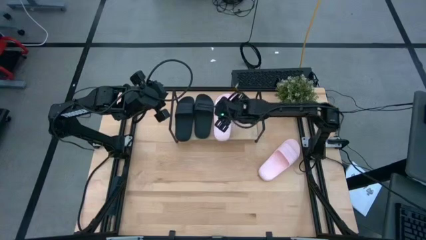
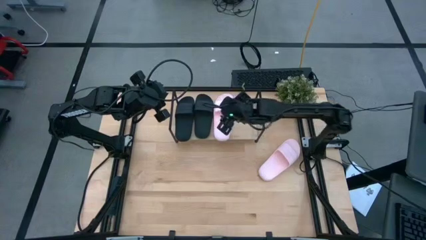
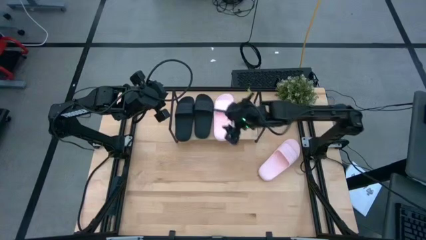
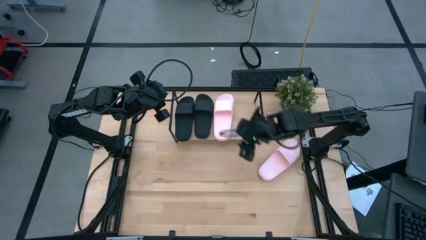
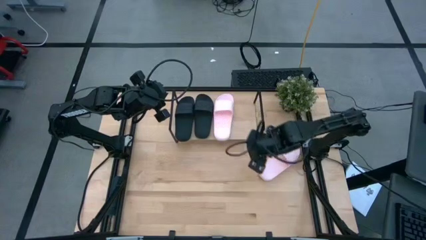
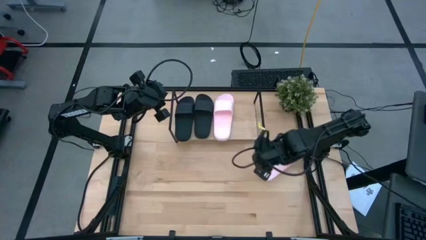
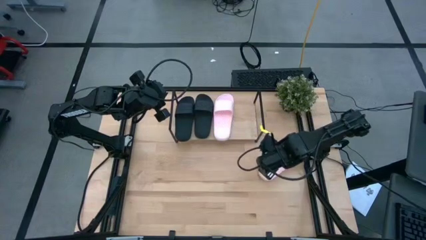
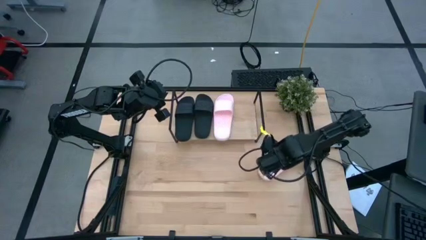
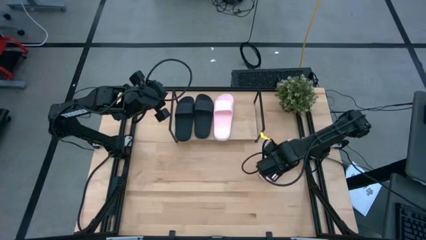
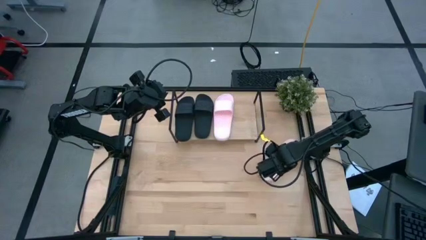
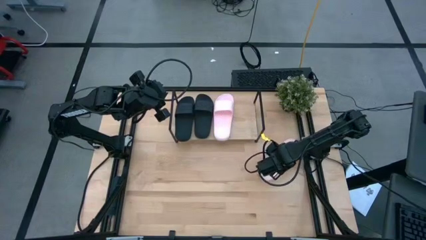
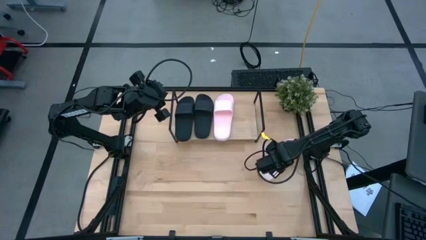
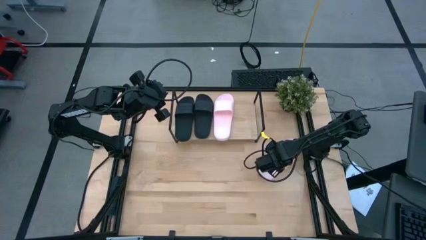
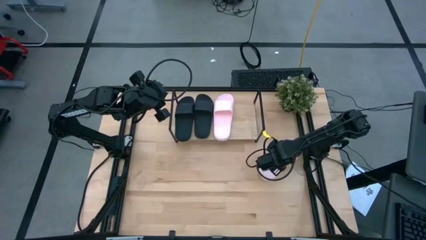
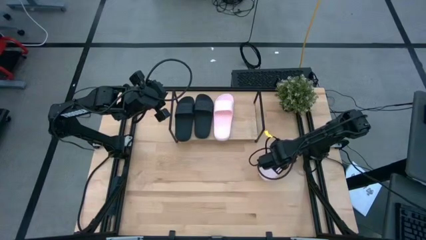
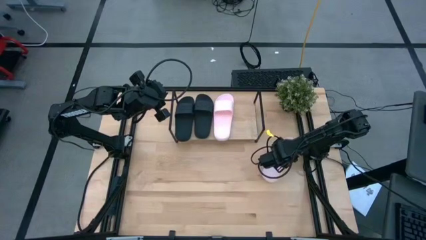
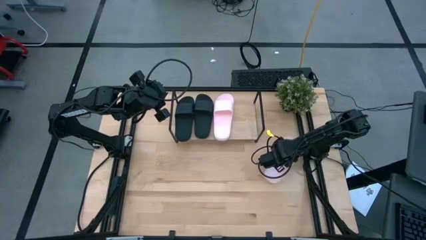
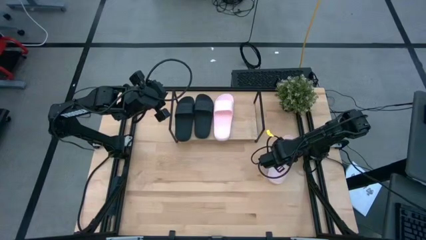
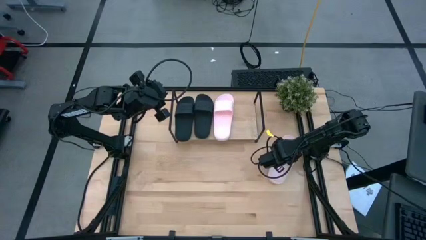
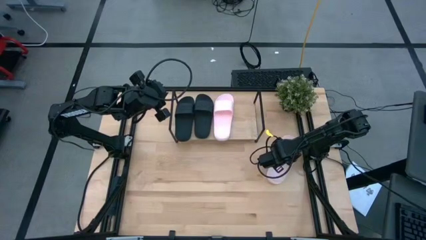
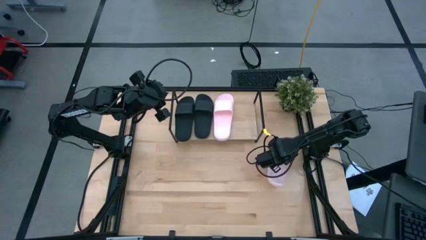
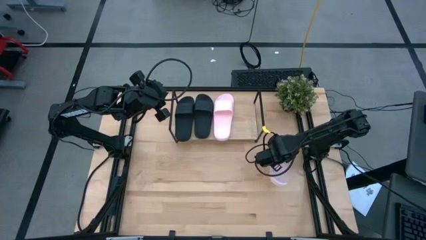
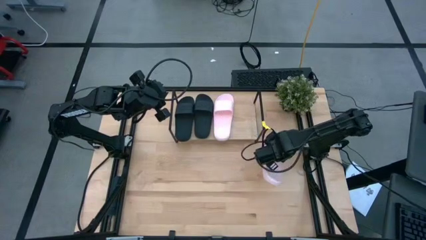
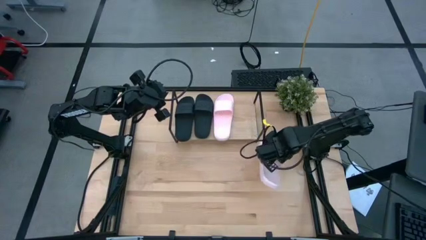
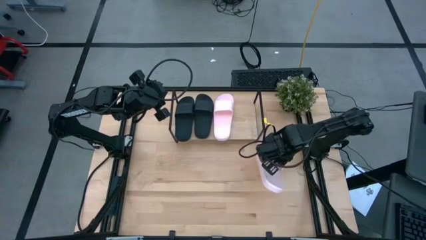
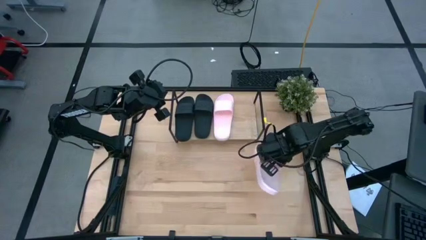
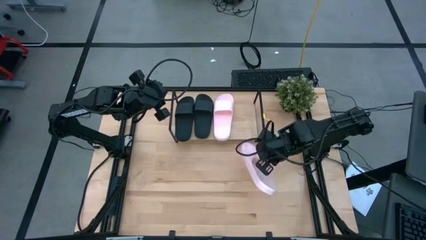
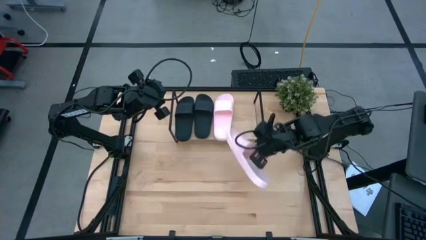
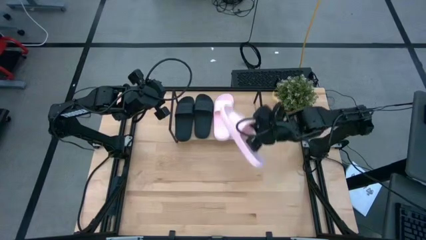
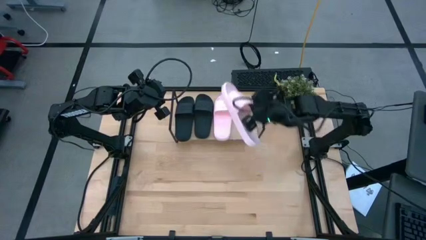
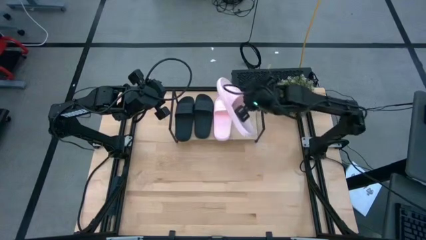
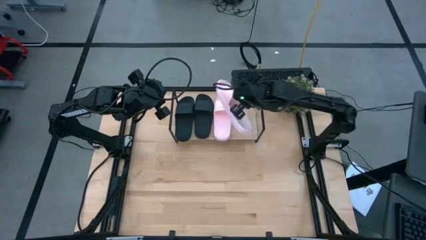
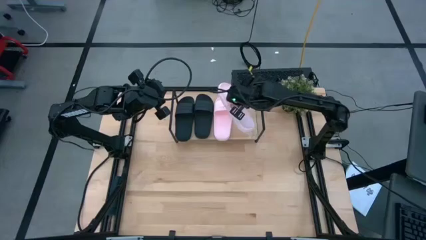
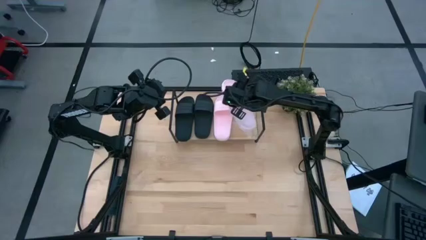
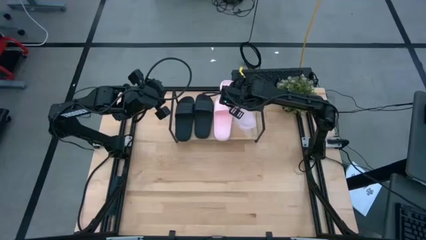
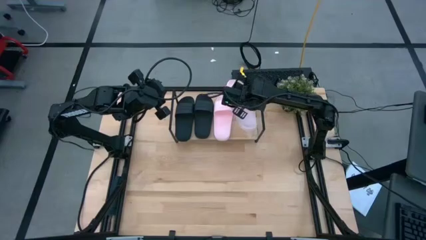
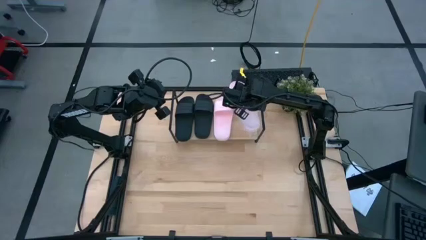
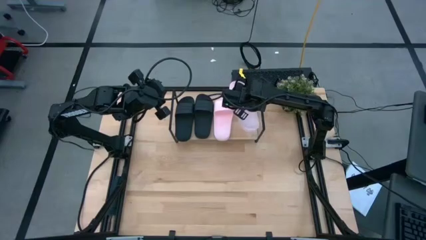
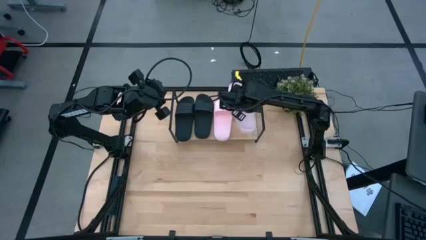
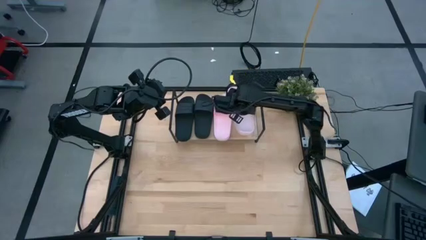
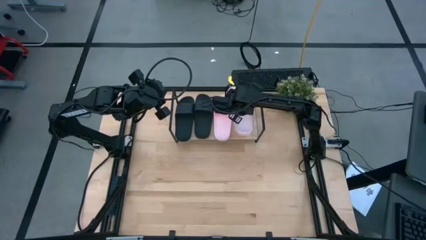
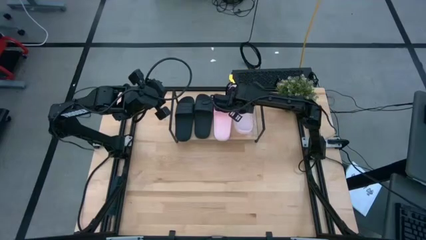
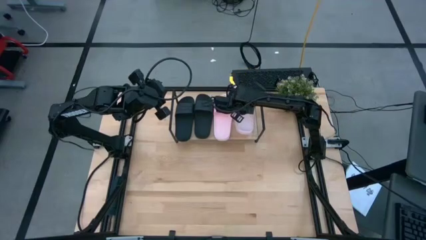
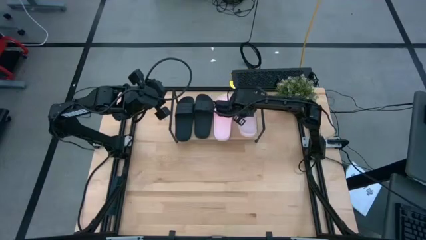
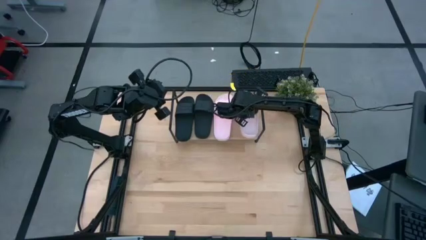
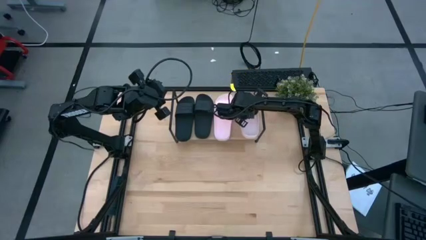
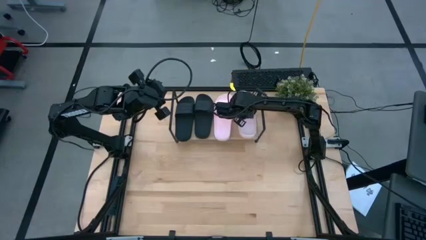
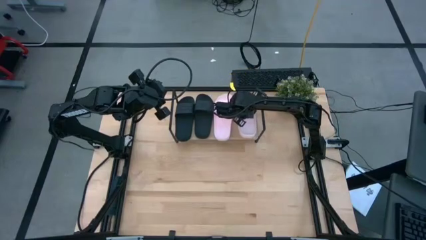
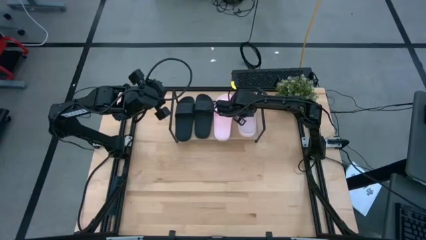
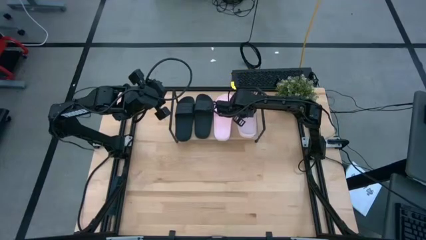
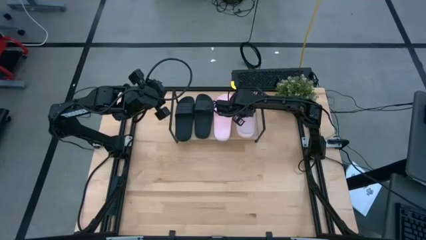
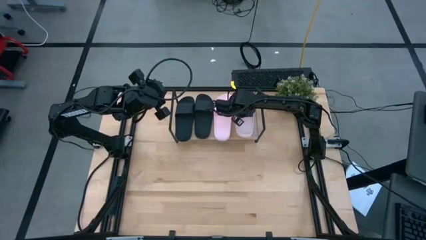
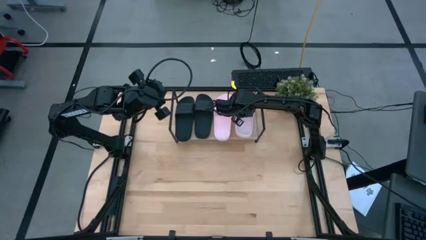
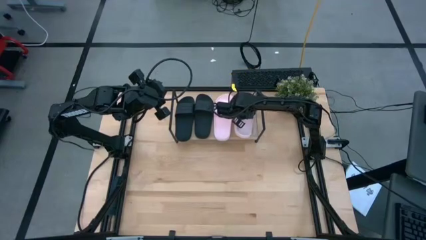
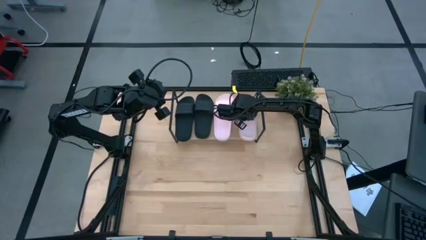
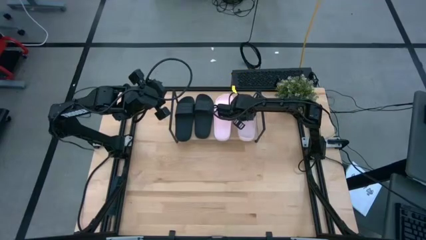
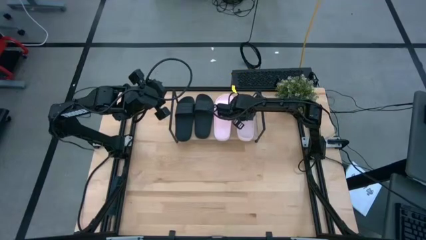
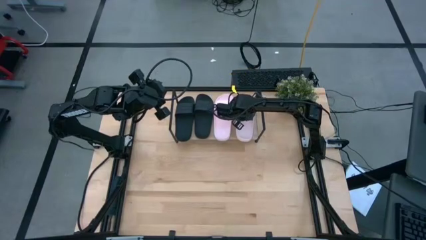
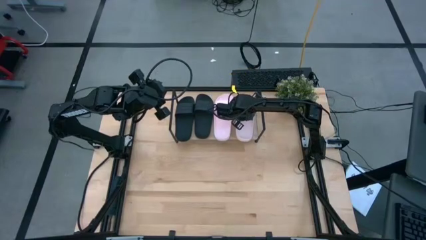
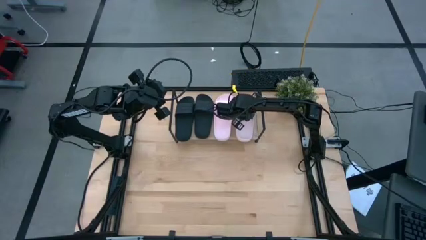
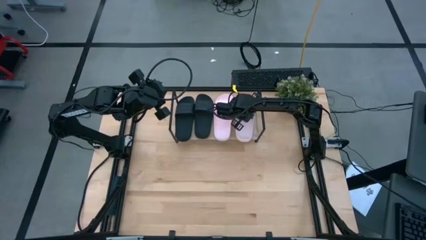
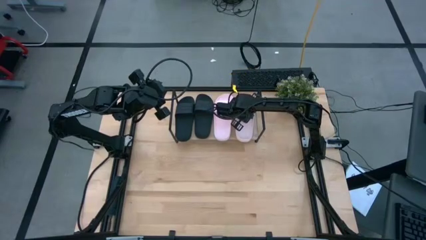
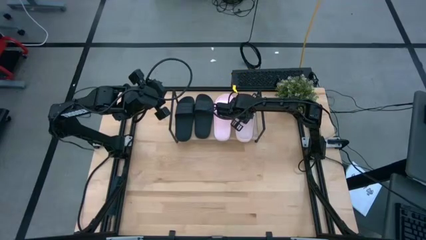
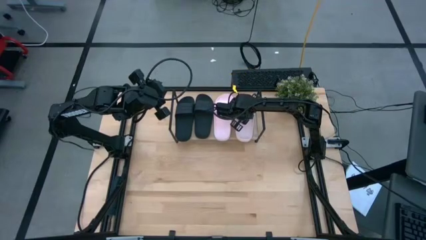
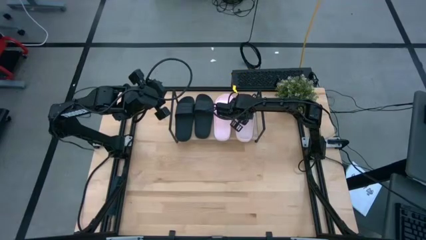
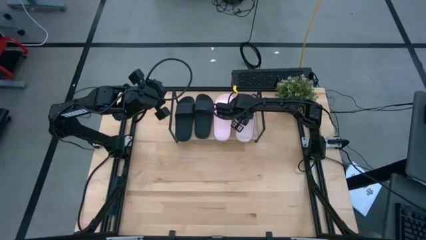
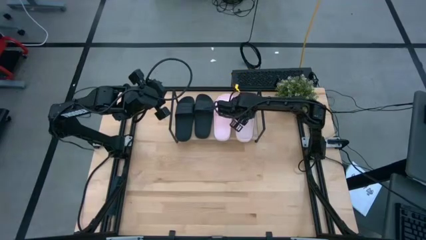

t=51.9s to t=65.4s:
Task: Pick and place slides into the shelf
Put the pink slipper on the shelf

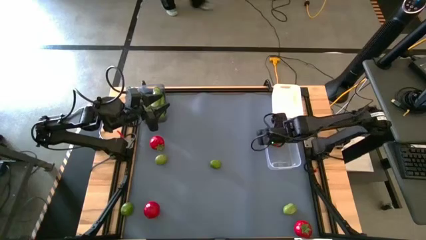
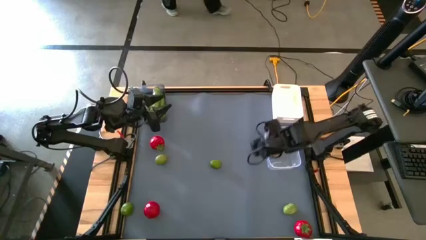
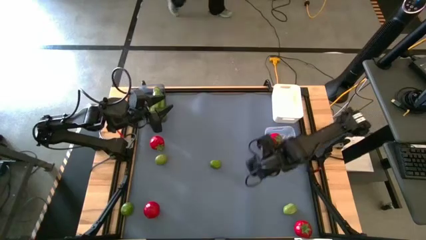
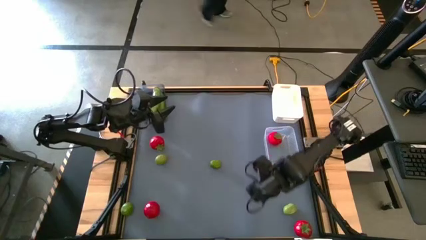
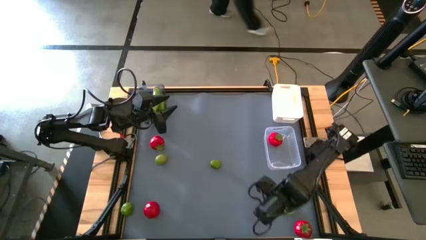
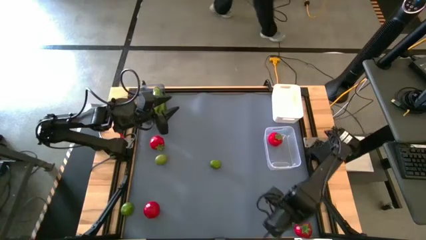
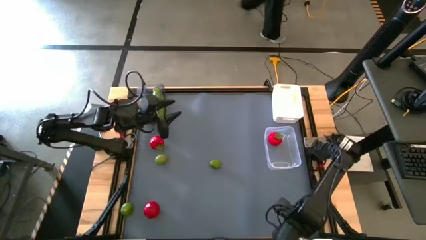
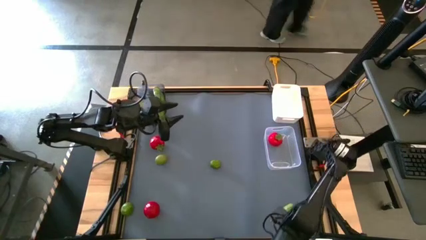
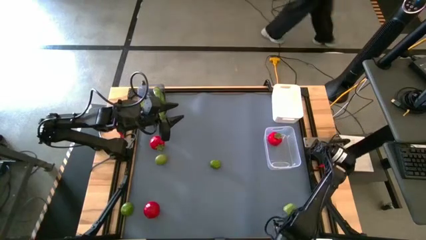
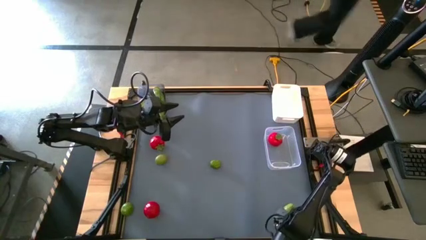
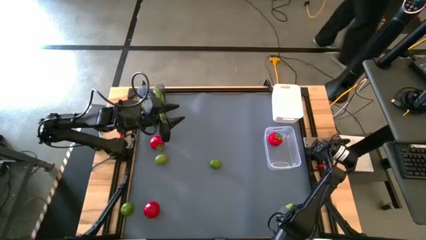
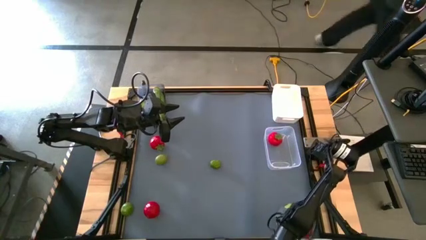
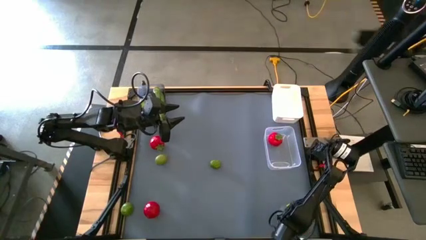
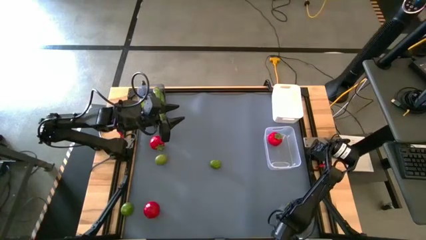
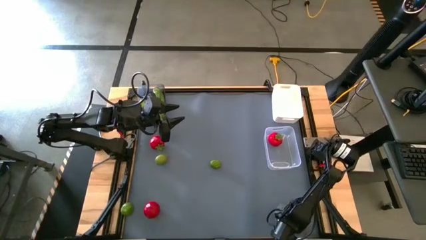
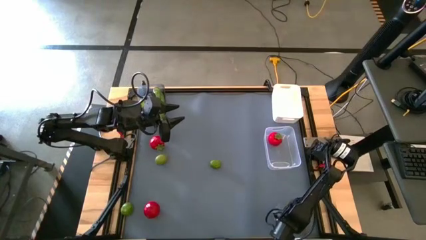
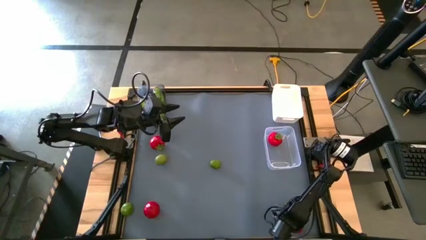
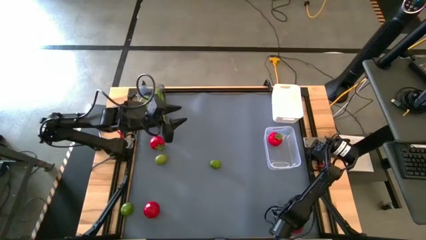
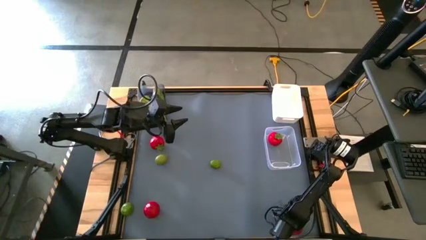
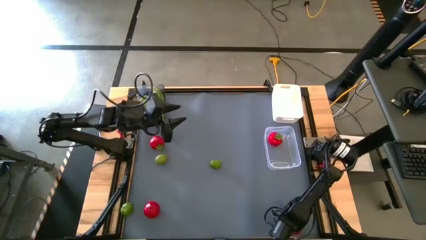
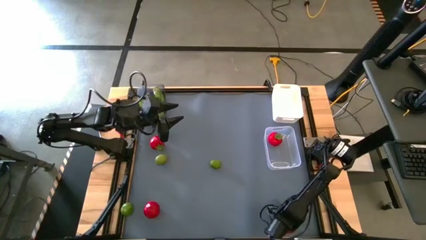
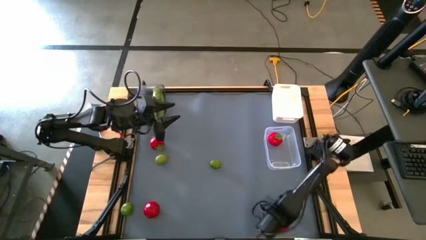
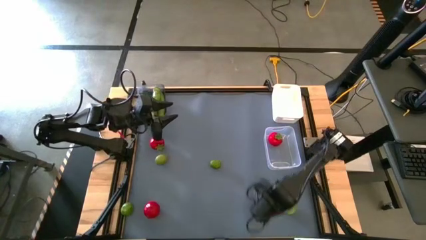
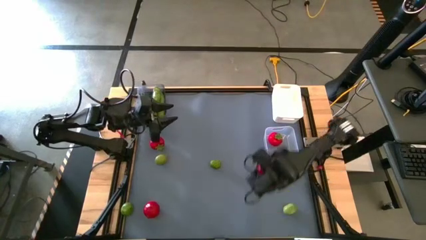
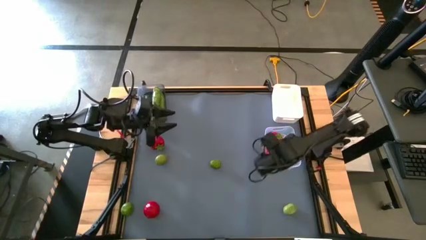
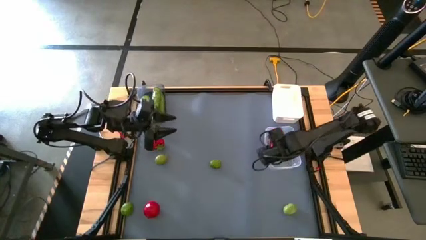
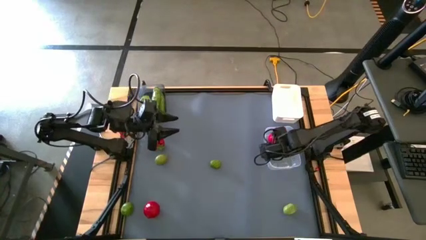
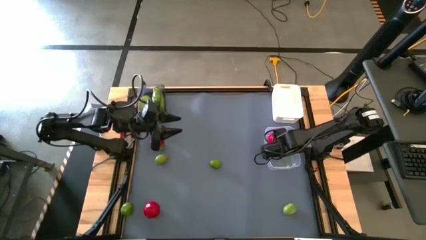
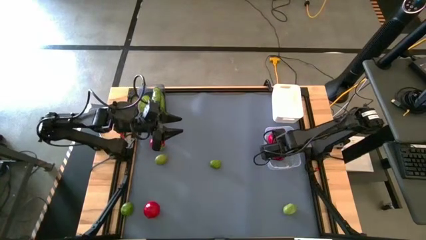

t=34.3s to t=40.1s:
Task: Sort produce into baskets
Put the tomato into the transparent bin
